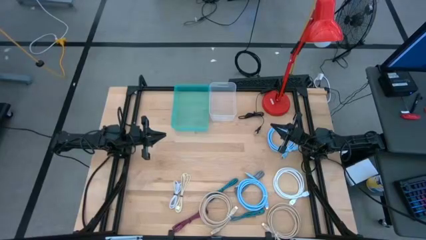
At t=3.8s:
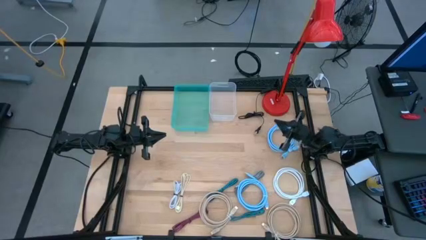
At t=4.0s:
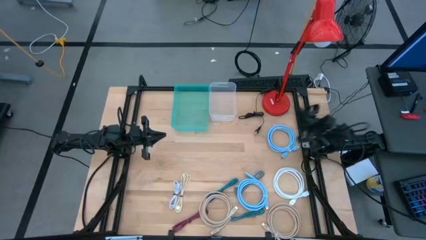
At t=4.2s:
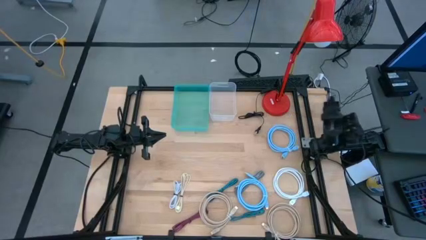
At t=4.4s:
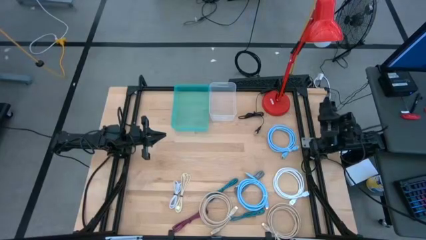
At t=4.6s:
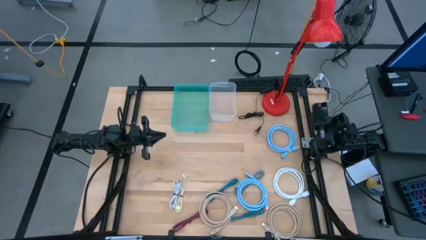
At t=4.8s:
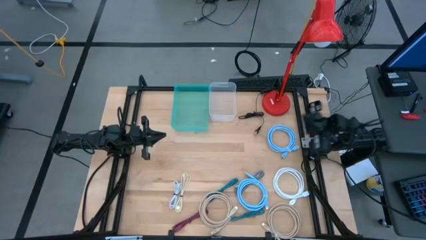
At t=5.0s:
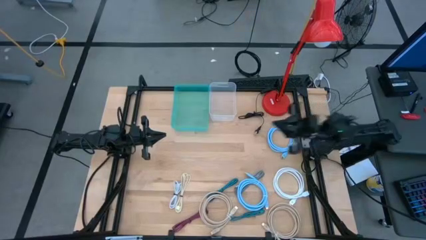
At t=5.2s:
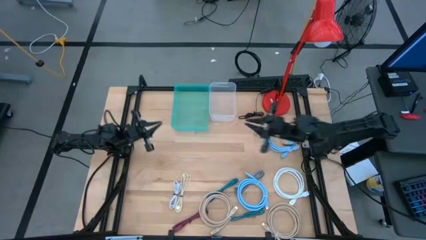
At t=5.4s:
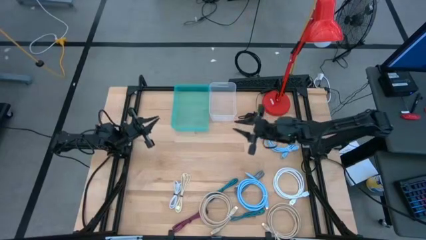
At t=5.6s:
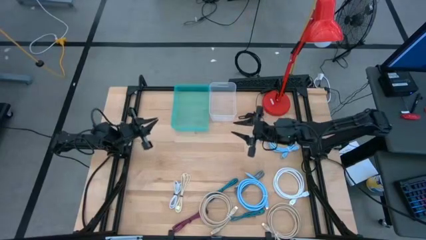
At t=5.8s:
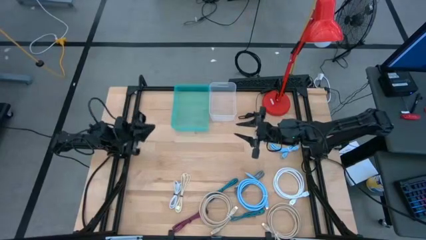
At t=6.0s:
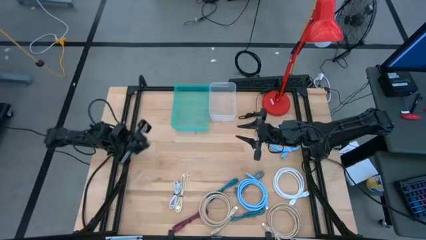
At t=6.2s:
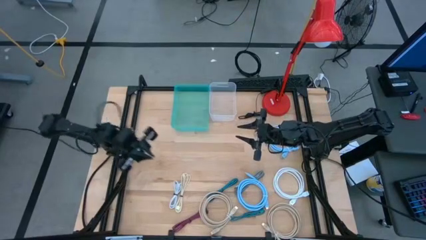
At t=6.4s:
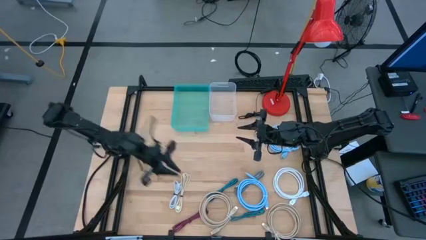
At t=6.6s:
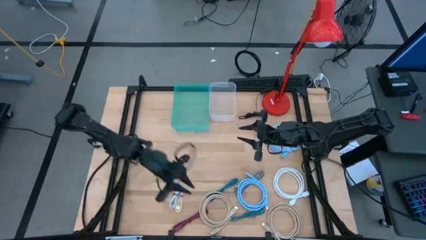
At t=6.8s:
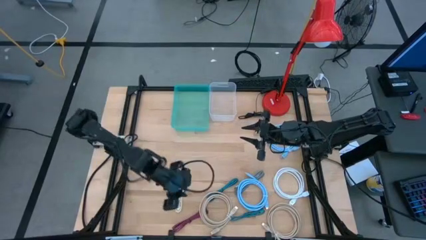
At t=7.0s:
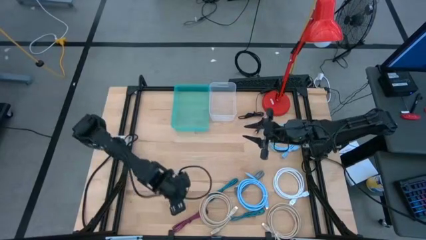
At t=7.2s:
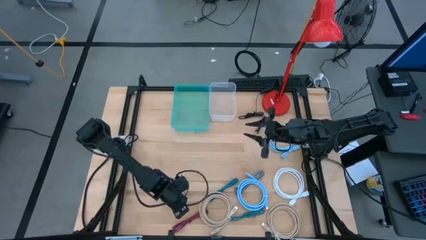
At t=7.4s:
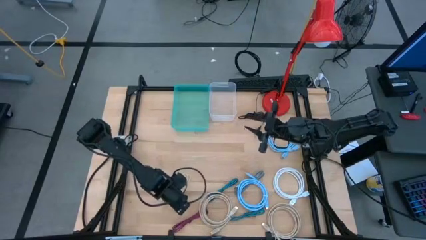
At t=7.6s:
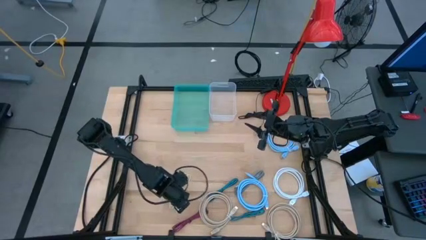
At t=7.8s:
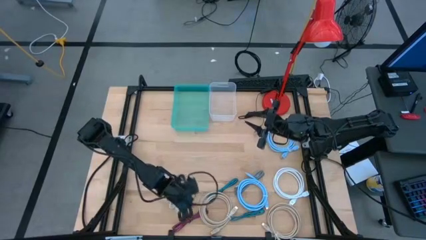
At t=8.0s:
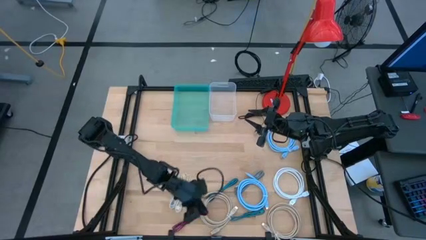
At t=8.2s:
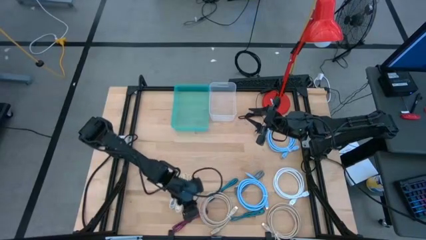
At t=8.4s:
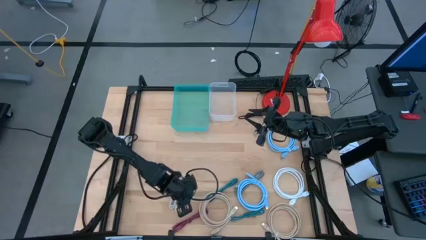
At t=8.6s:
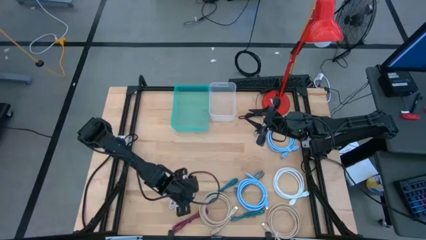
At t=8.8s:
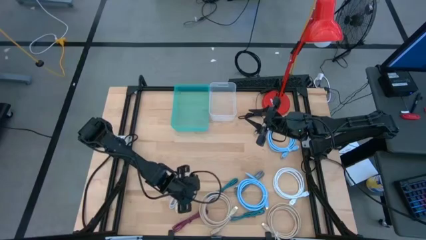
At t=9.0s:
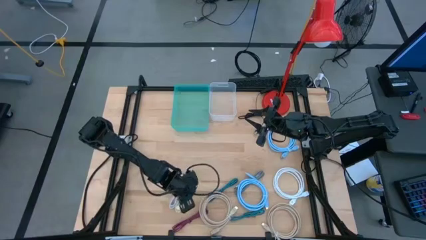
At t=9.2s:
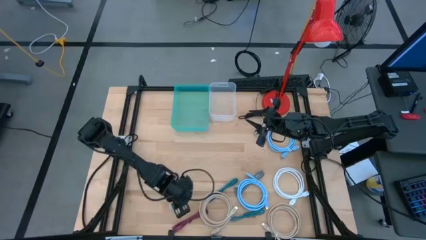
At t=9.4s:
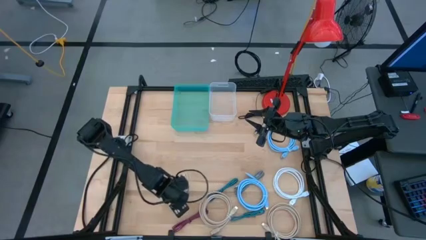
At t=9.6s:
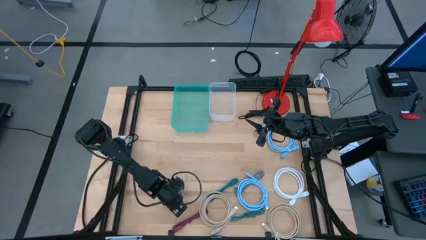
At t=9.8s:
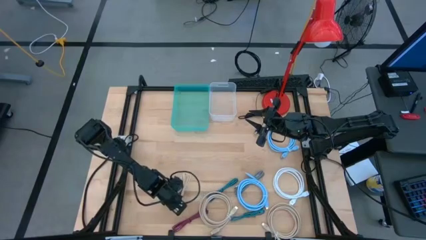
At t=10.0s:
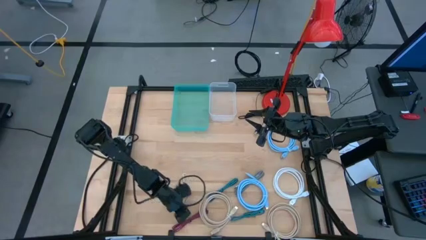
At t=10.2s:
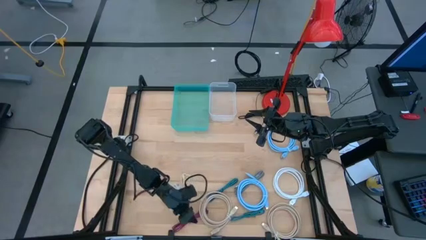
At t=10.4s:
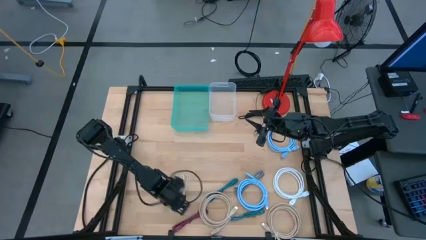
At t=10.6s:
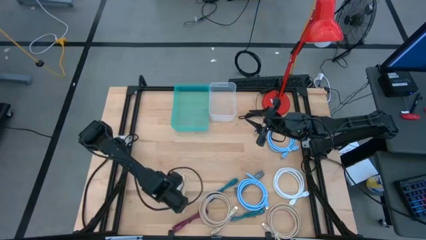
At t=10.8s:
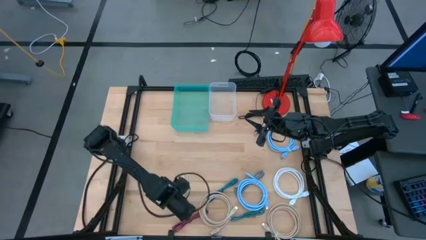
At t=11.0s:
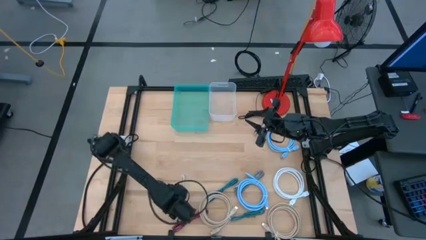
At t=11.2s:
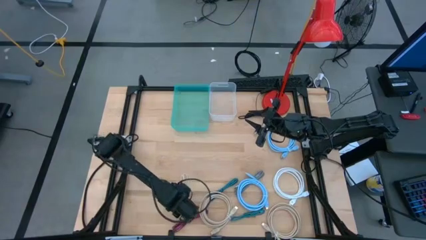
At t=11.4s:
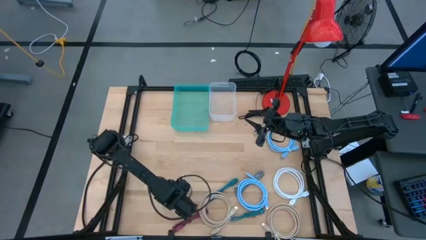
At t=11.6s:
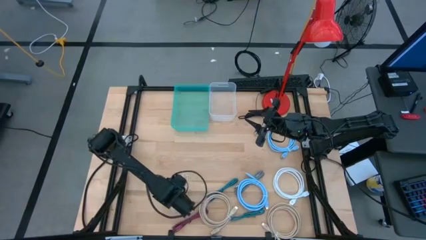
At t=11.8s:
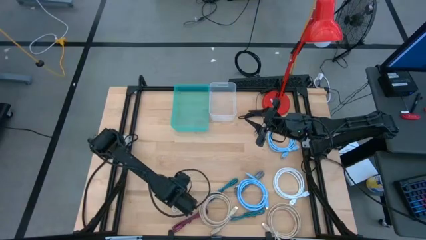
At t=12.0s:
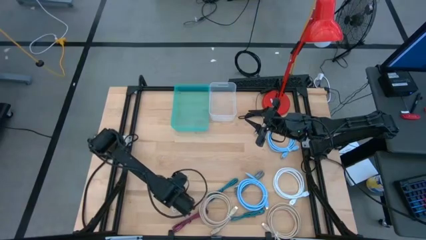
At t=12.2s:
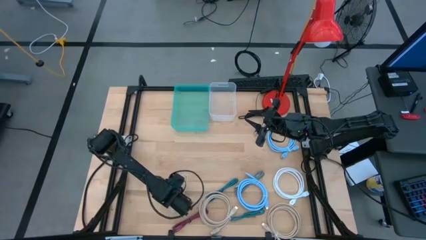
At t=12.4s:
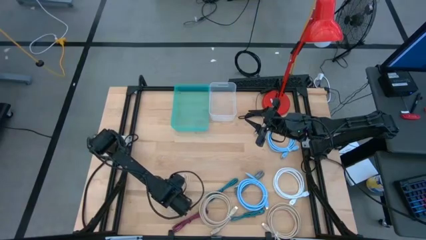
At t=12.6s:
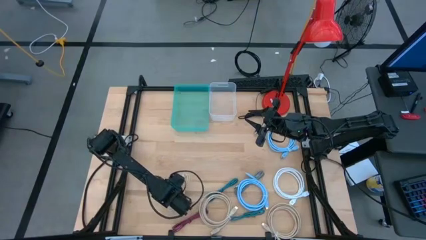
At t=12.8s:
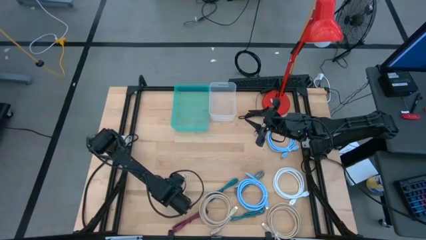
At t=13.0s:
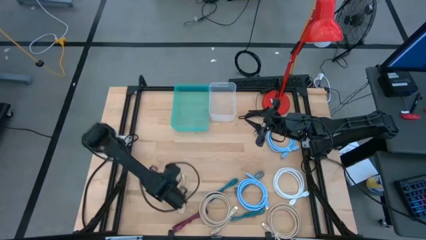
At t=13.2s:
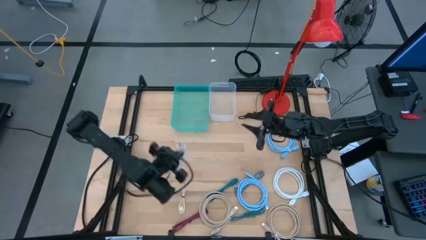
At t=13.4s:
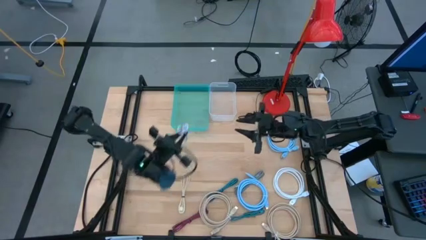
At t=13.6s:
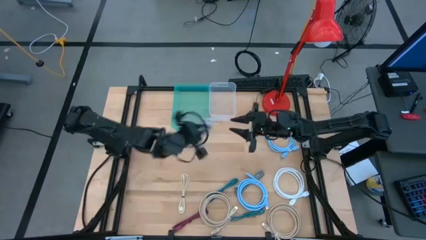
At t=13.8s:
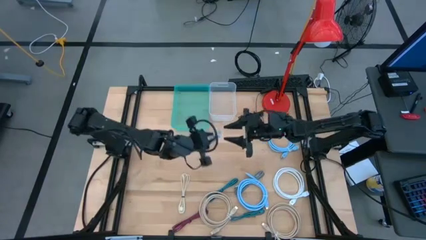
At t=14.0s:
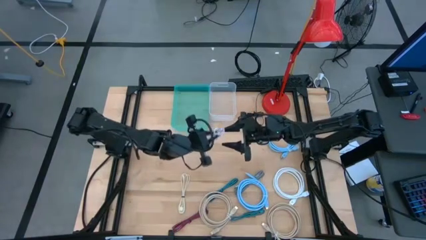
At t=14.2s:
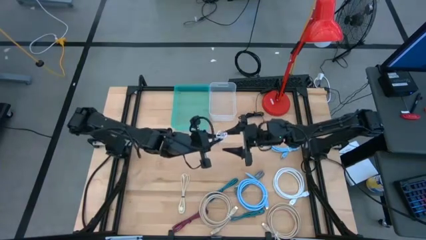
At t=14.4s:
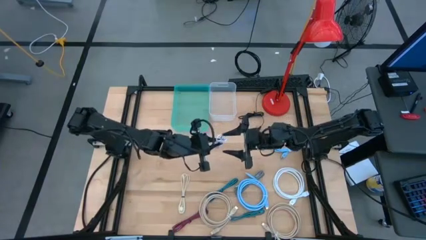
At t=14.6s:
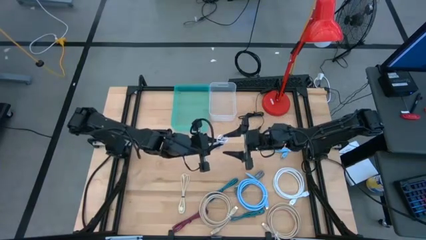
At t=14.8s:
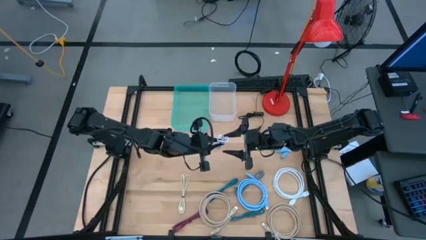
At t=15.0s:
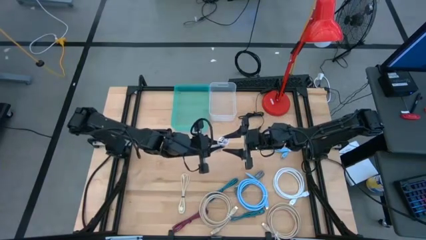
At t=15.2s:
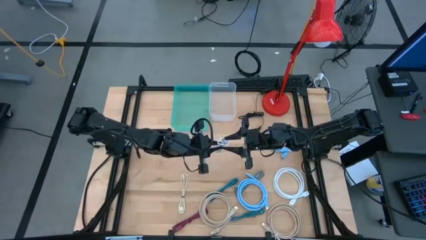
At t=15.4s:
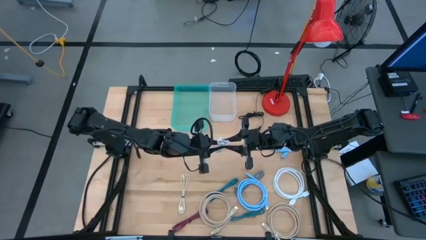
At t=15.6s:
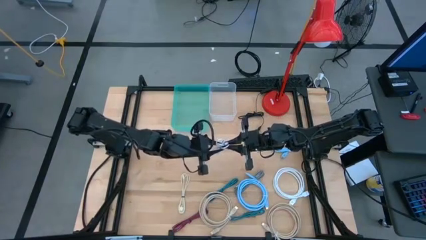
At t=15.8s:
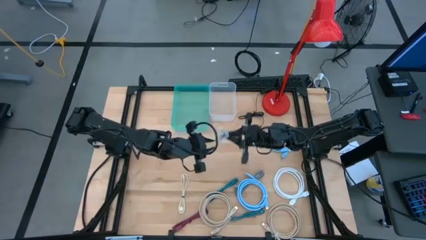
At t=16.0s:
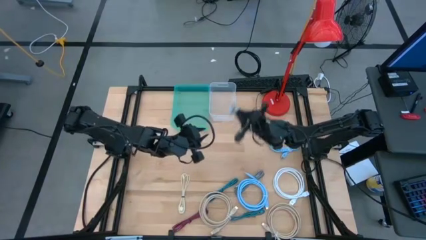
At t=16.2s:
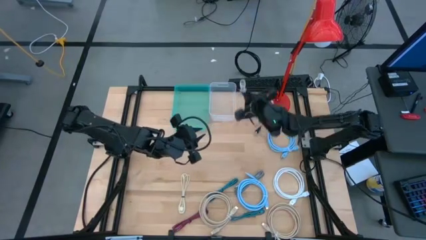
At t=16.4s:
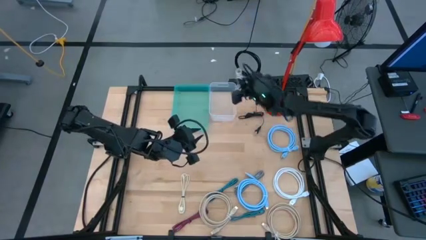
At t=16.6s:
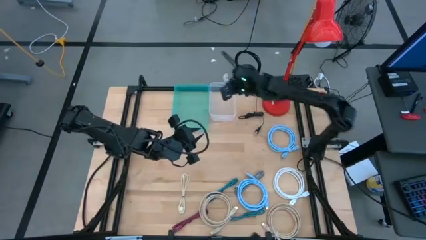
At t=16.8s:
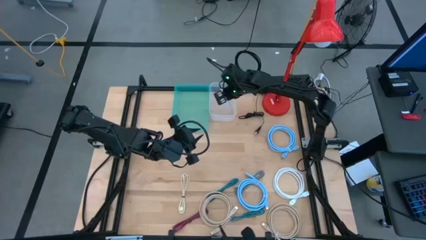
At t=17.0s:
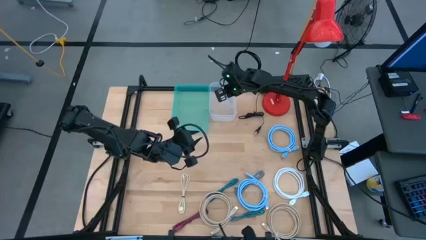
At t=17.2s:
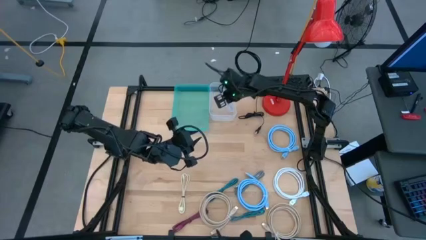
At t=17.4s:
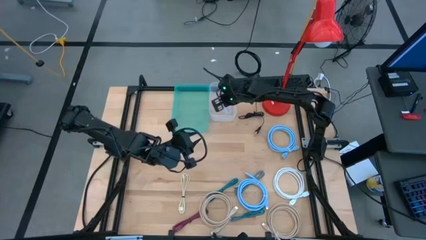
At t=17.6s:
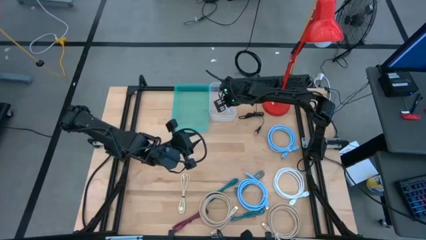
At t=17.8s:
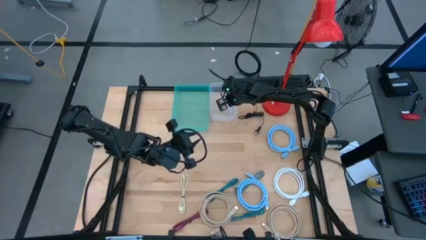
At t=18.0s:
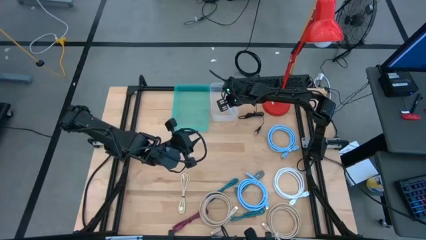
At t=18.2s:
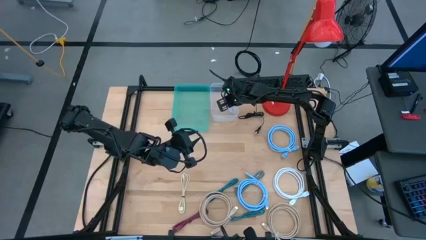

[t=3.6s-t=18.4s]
Task: Pick and place items into bin
Put the white charger cable into the transparent bin
